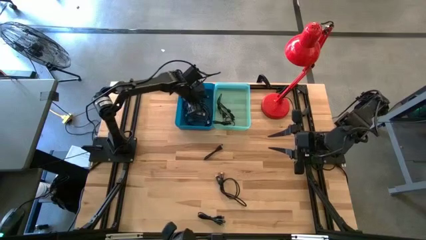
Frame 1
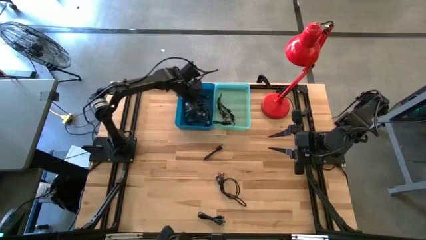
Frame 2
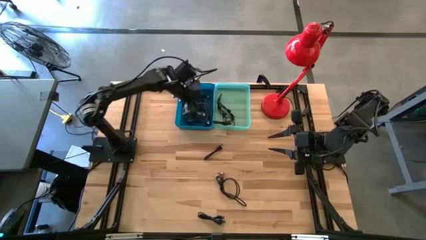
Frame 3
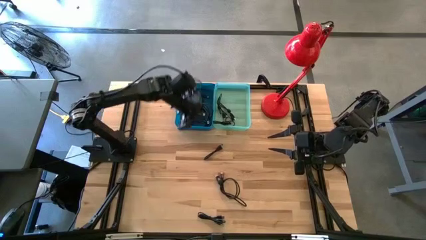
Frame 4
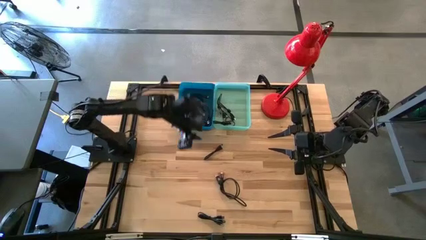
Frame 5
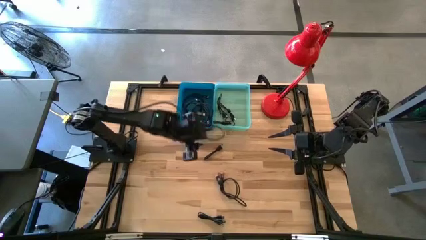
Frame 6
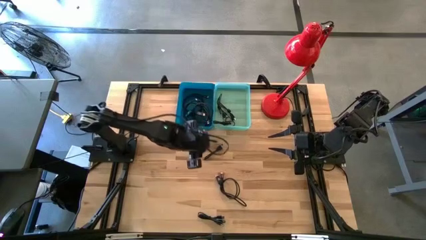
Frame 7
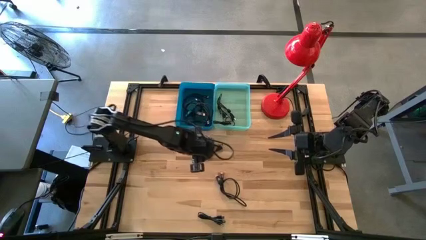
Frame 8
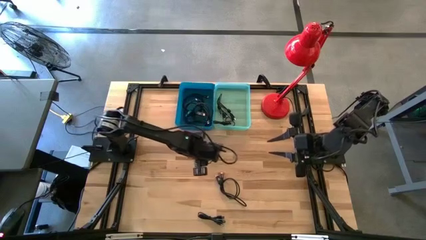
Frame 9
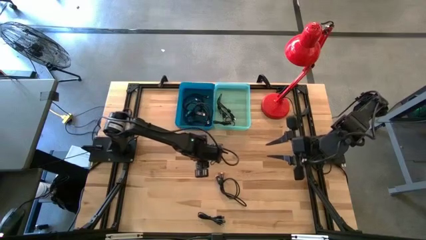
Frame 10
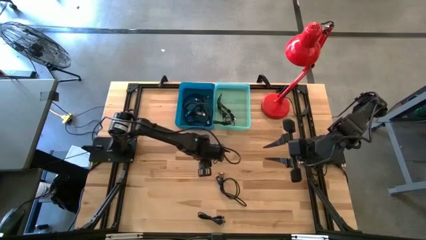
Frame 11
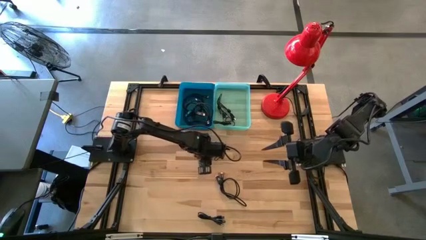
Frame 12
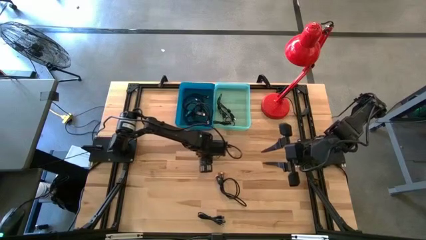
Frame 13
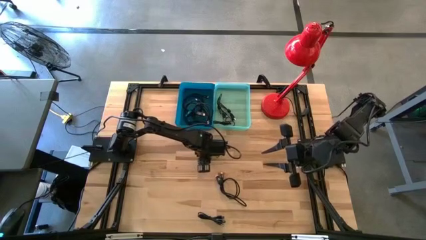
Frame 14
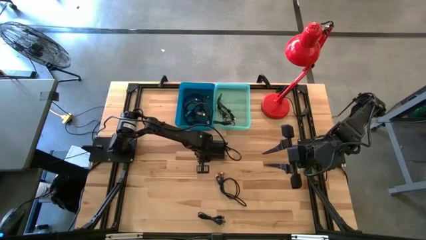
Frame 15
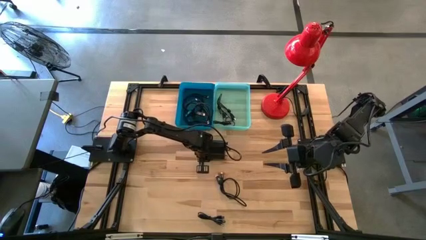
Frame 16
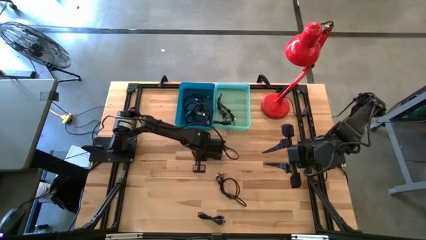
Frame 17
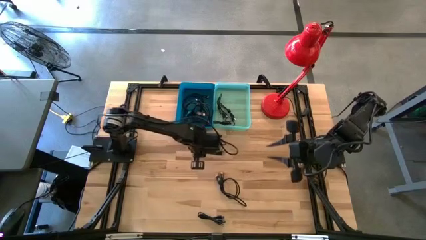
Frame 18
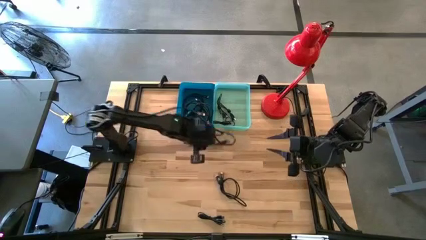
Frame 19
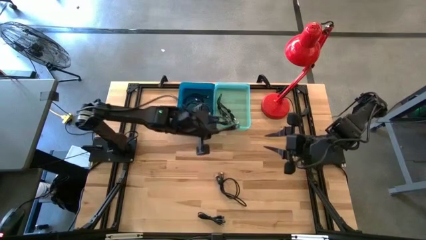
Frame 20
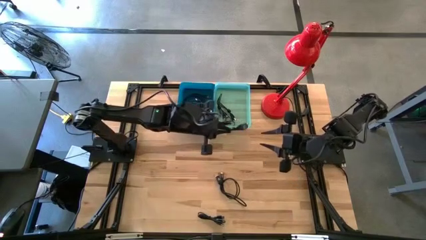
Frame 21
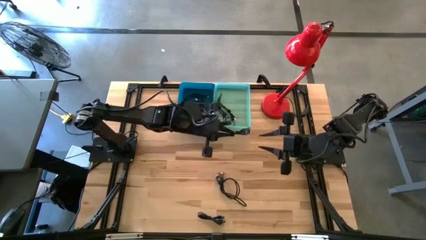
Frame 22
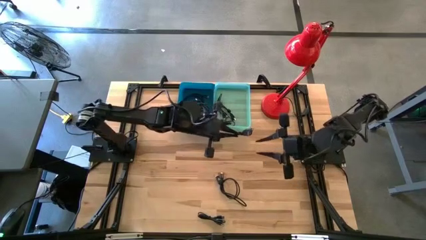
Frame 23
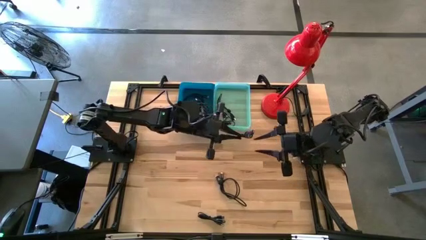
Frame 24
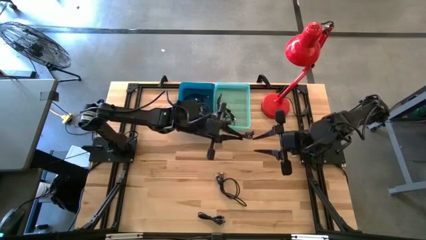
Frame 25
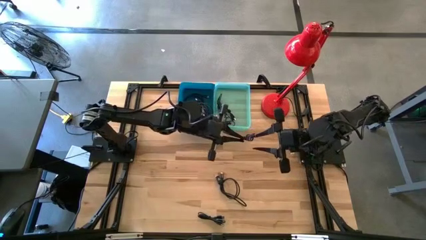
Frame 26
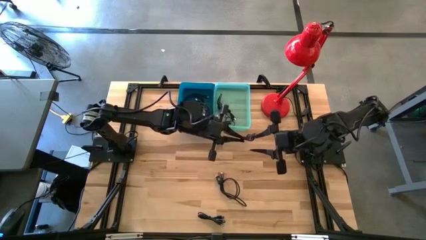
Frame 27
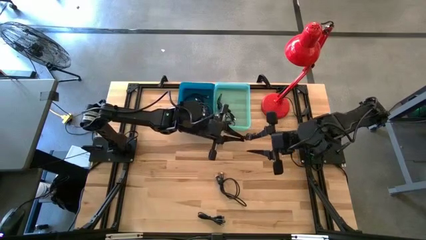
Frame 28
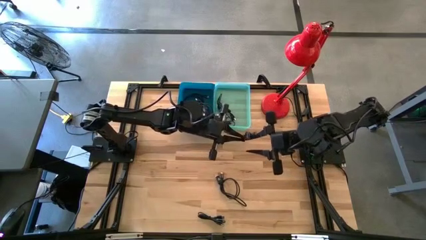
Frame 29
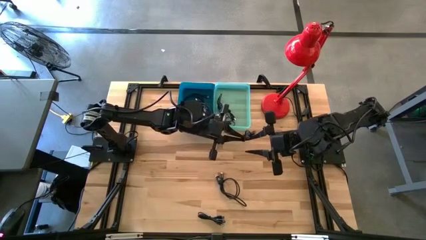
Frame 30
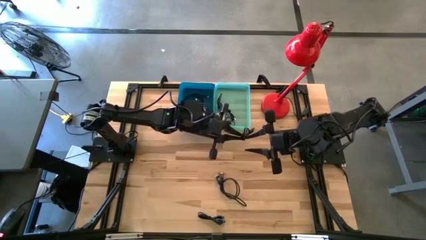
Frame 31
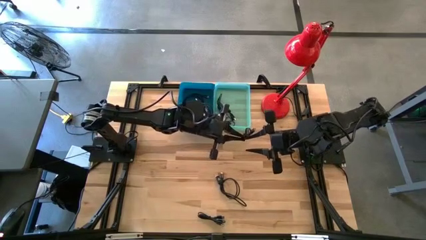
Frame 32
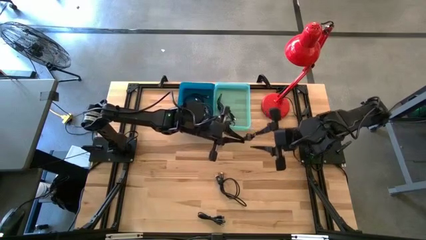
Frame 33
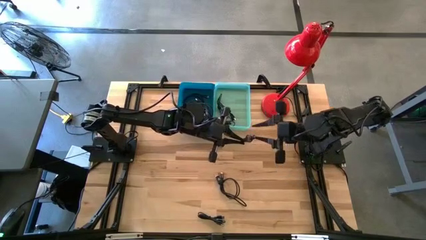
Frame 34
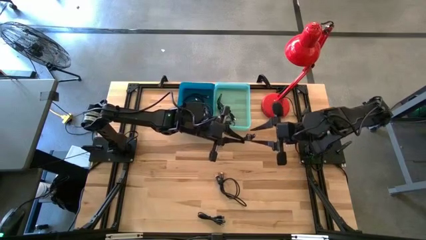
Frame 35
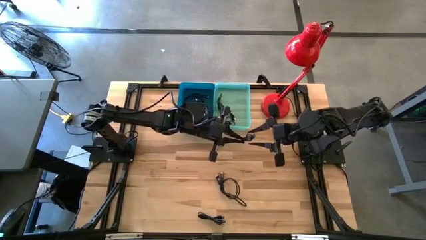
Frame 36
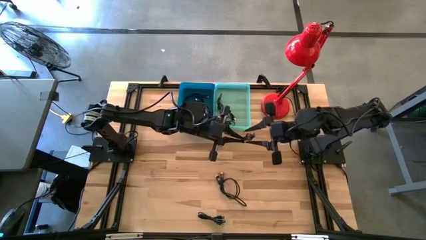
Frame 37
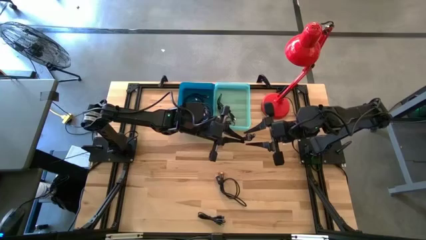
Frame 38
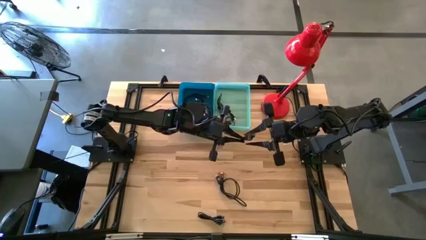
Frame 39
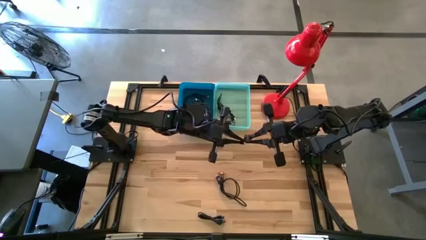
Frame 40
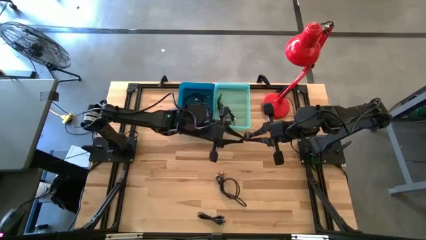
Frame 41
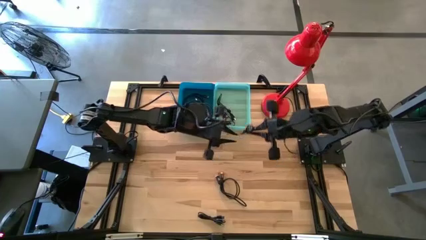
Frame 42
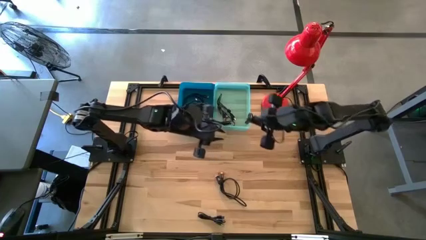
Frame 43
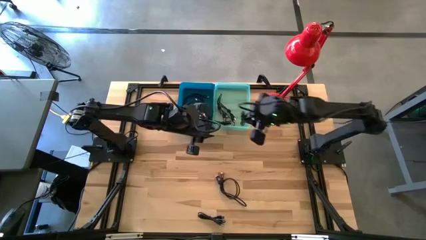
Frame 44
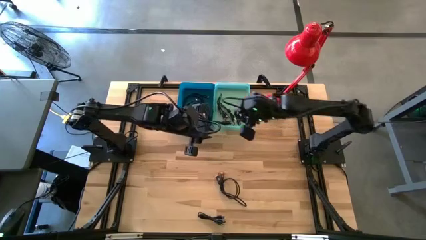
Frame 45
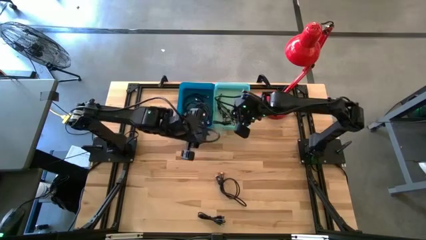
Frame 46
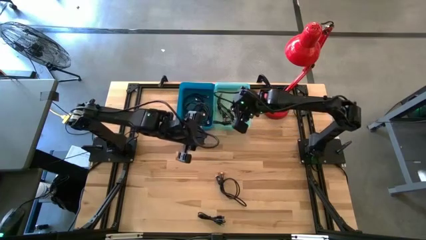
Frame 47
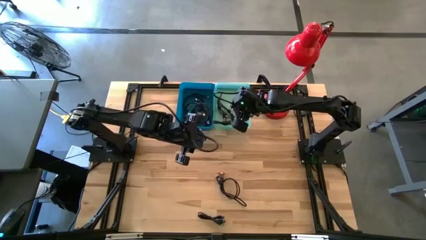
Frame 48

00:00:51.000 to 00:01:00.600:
Task: Pick & Place USB Port
Put the black usb cable into the light blue bin

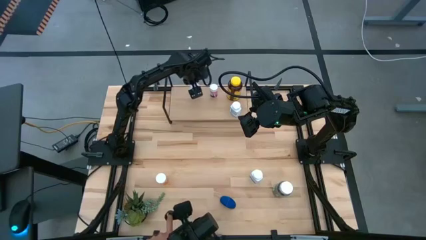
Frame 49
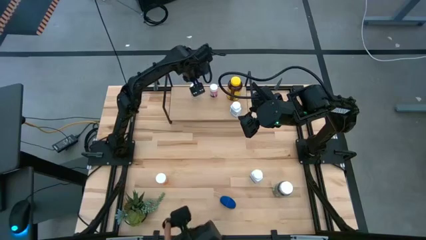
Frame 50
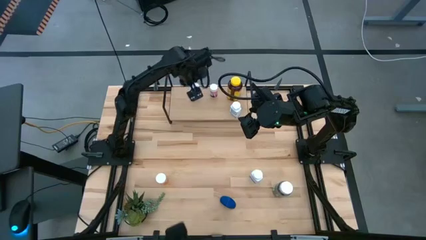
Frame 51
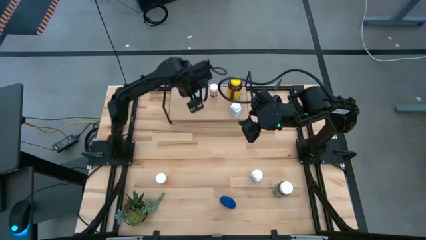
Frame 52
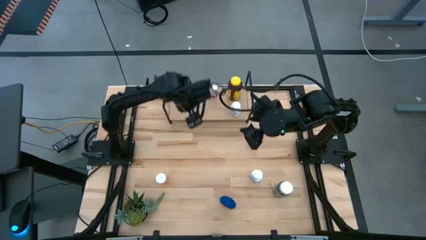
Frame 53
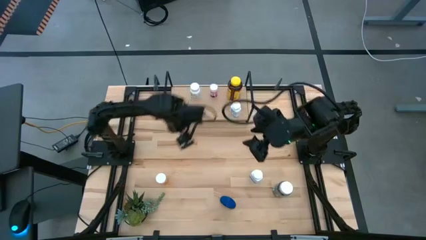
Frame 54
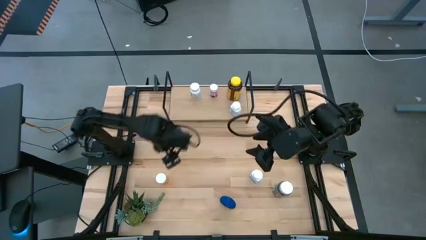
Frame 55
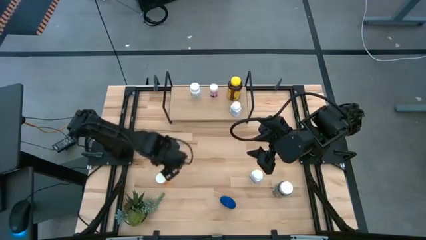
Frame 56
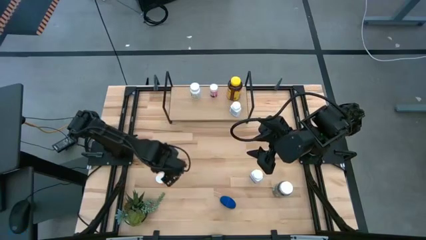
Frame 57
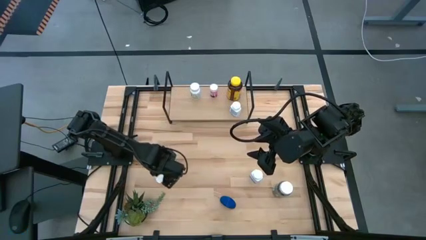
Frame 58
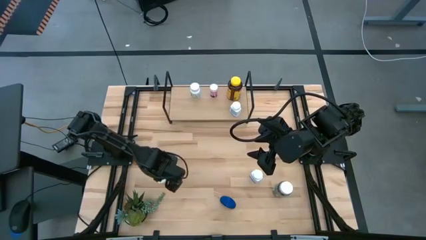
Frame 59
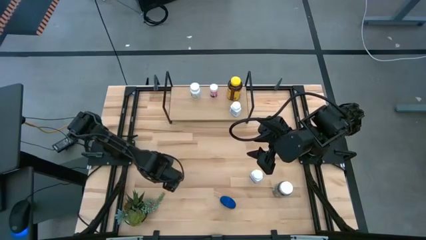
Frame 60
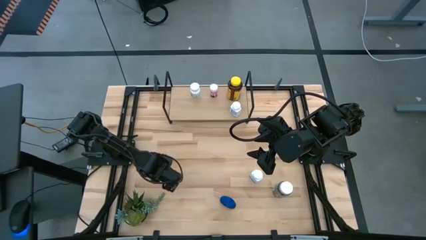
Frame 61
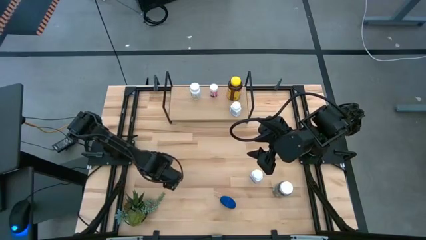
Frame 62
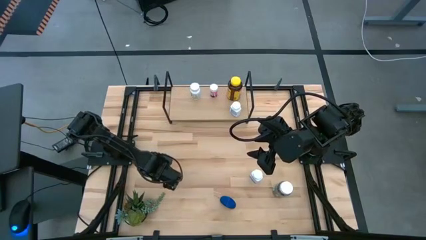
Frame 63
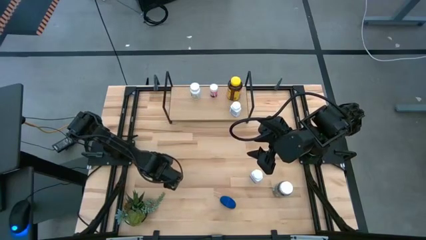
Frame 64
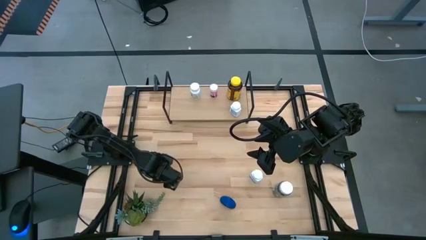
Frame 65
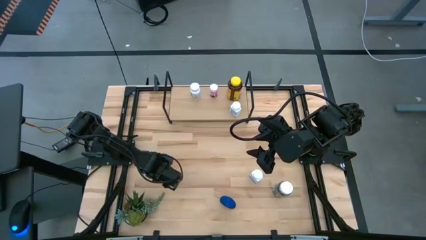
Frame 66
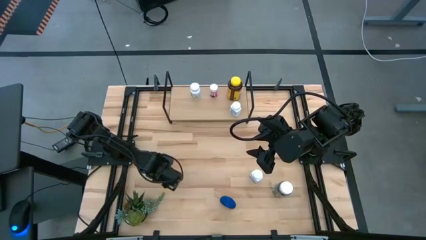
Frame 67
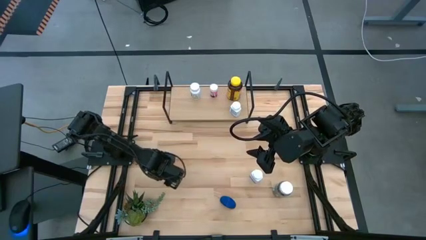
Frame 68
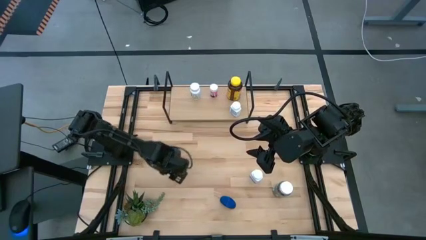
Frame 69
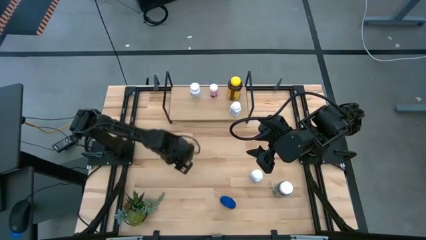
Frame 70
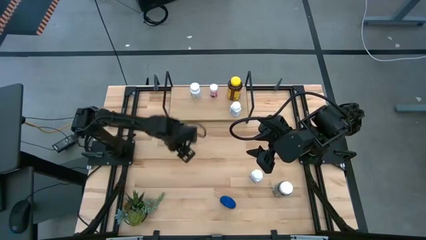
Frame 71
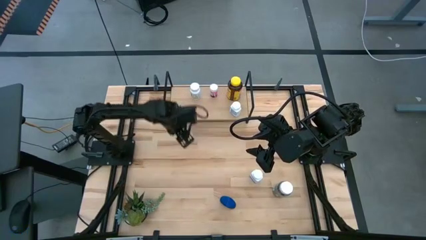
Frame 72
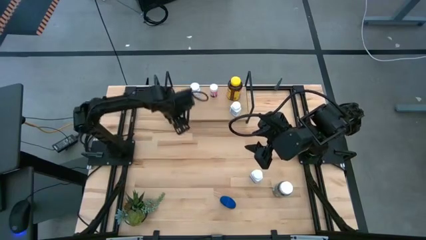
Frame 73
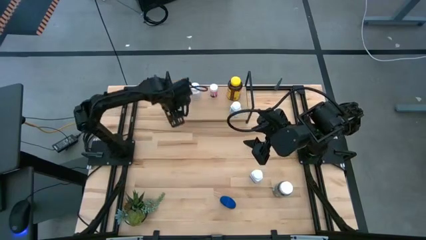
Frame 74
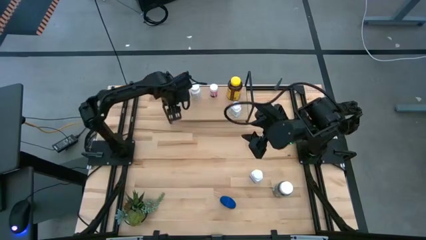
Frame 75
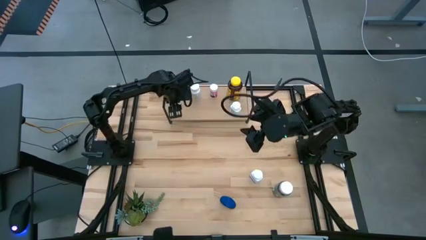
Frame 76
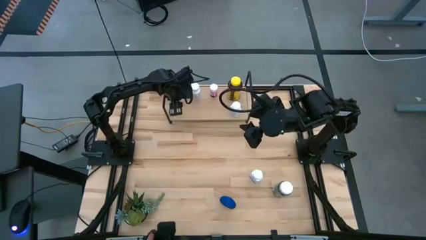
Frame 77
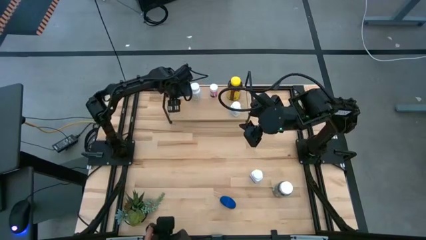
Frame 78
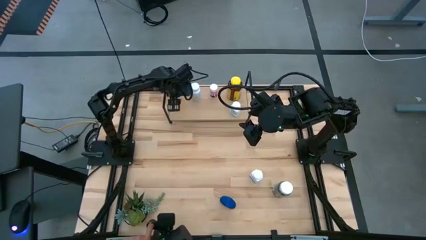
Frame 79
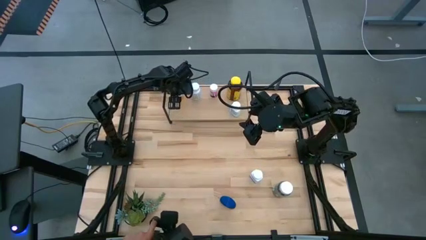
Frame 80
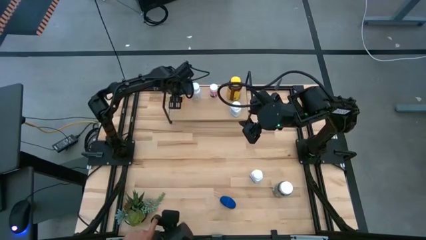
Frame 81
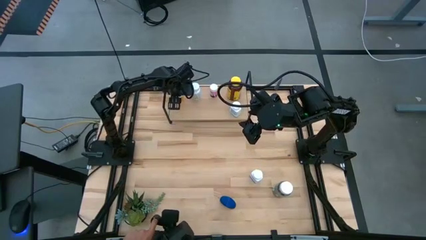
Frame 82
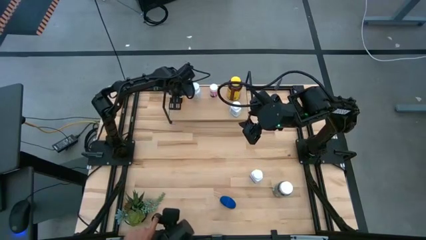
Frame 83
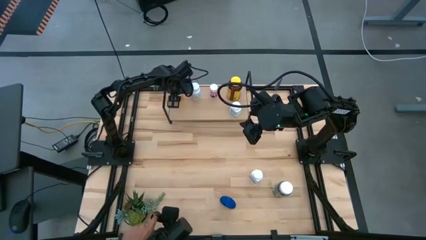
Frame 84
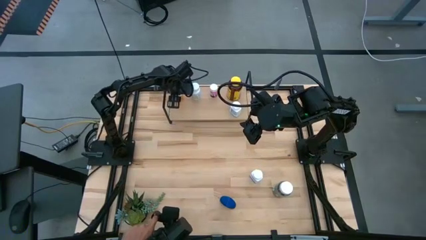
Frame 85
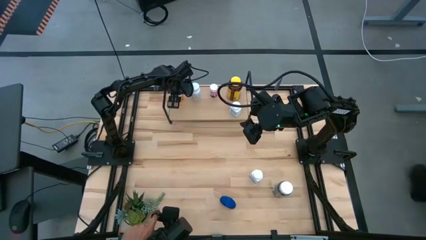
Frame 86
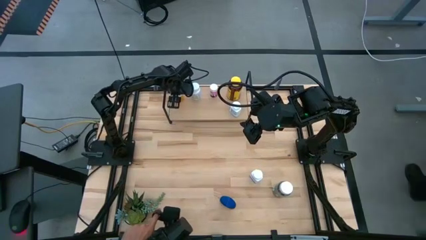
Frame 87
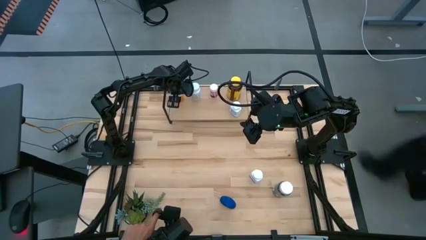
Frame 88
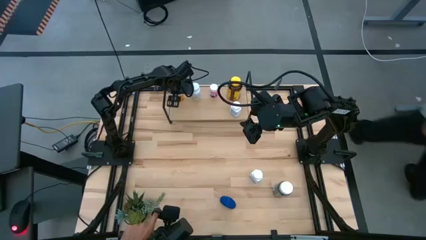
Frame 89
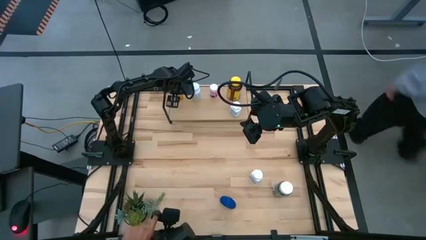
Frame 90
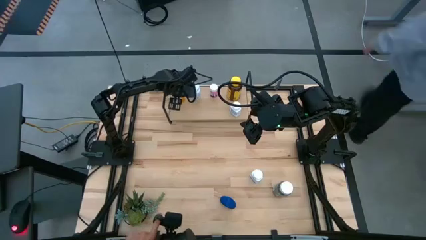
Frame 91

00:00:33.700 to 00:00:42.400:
Task: Pick and place medicine bottles onto shelf by color
Put the yellow pill bottle on the shelf
